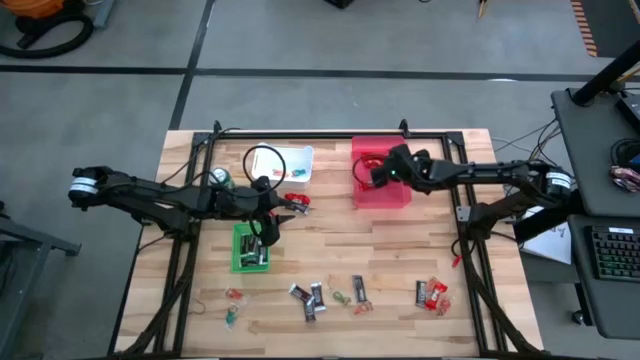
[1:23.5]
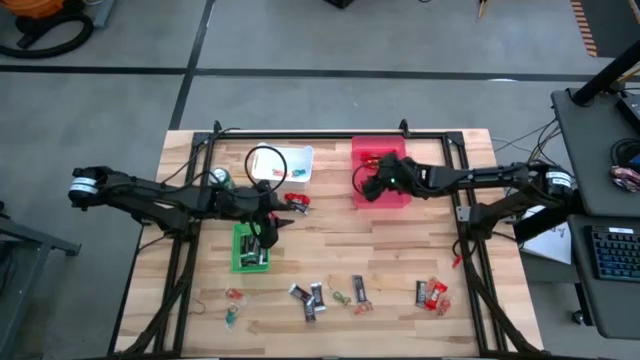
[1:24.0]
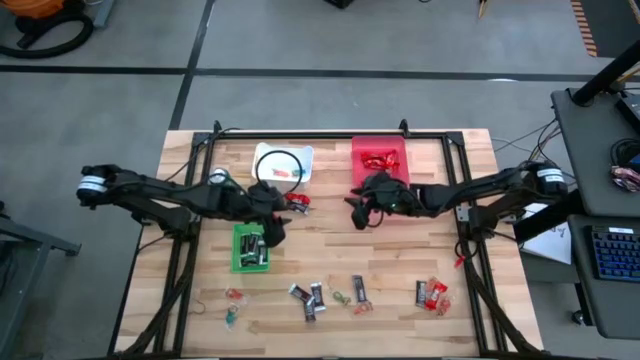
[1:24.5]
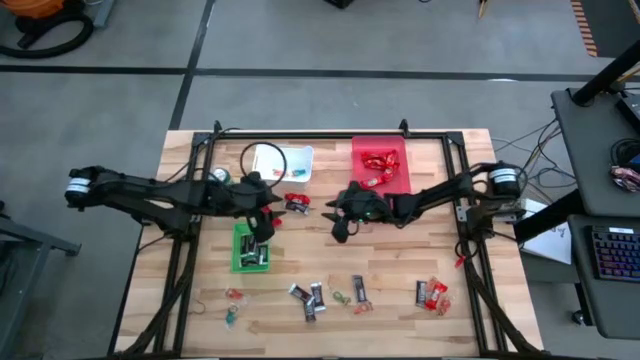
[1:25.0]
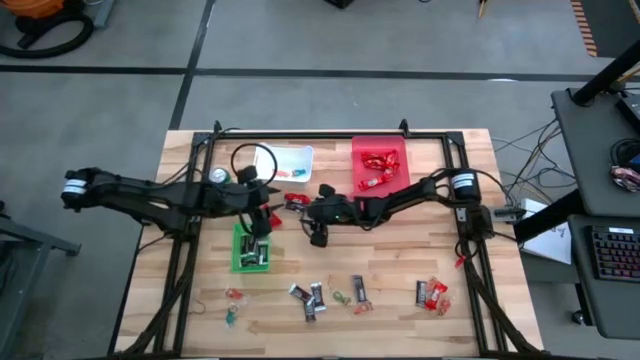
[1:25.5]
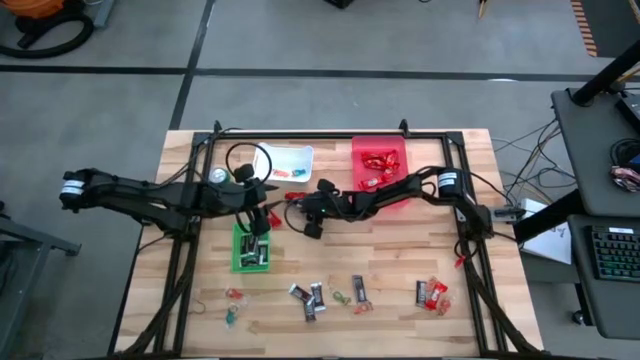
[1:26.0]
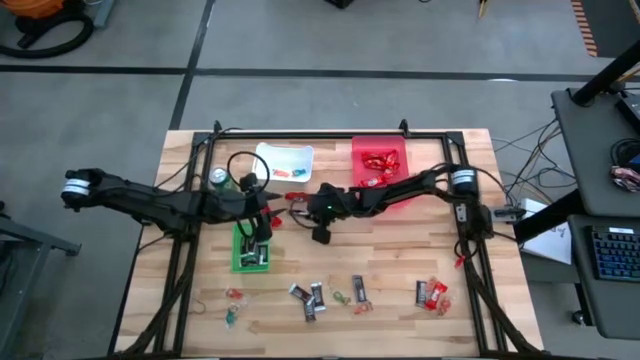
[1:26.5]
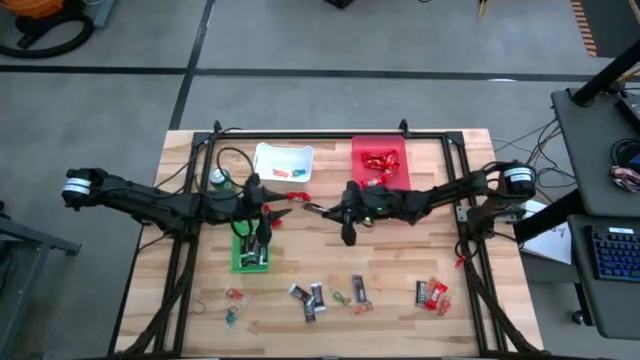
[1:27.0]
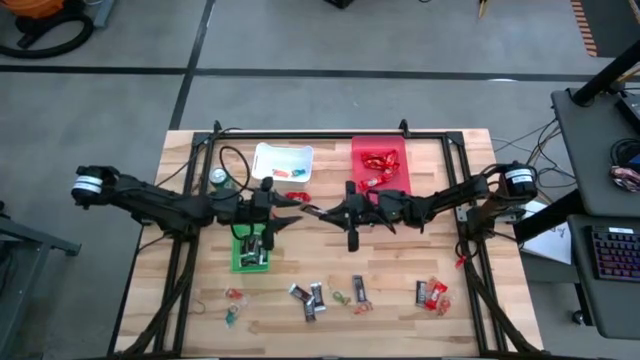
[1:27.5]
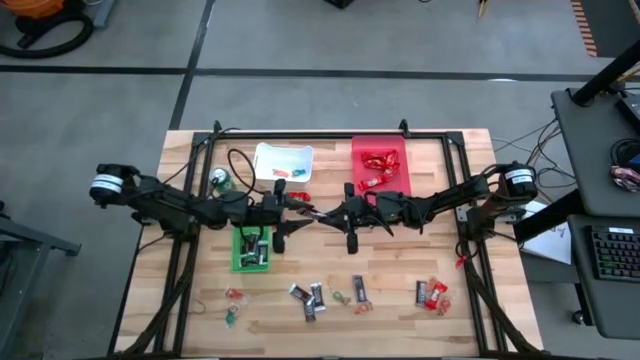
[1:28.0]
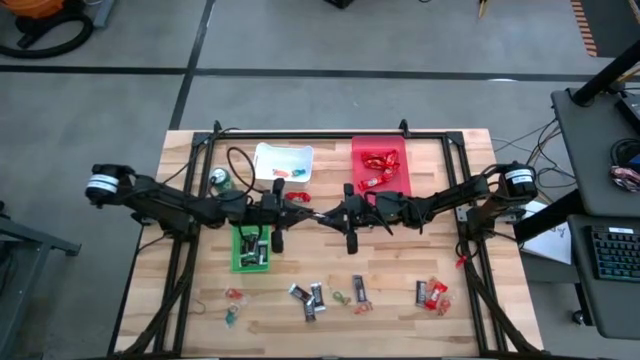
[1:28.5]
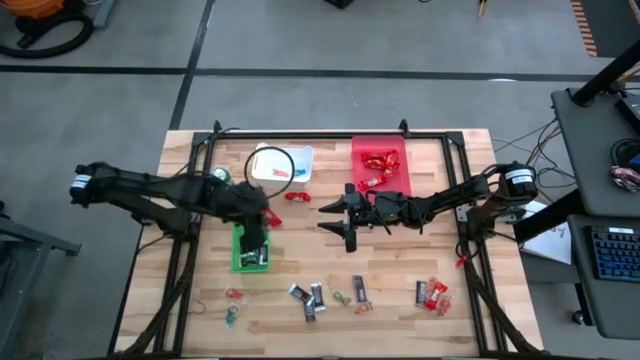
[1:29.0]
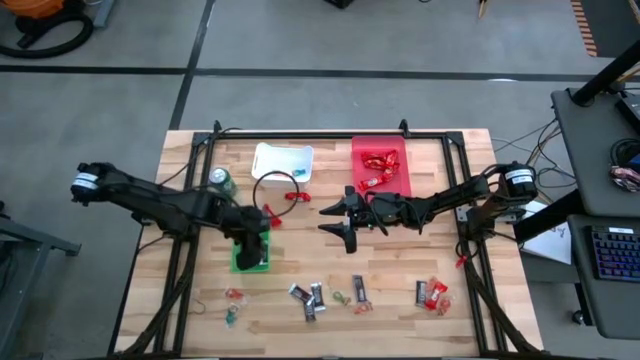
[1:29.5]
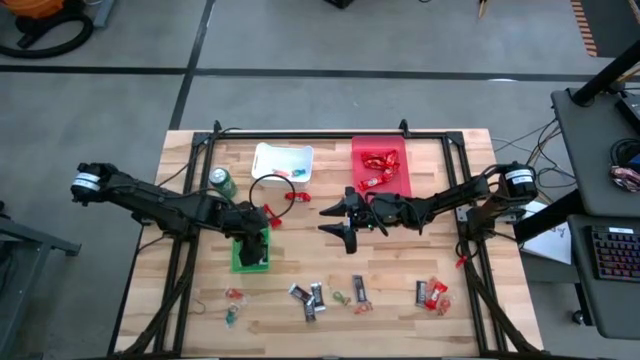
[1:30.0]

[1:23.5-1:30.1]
Task: Organize candy in baskets
Put the brown chocolate into the green basket

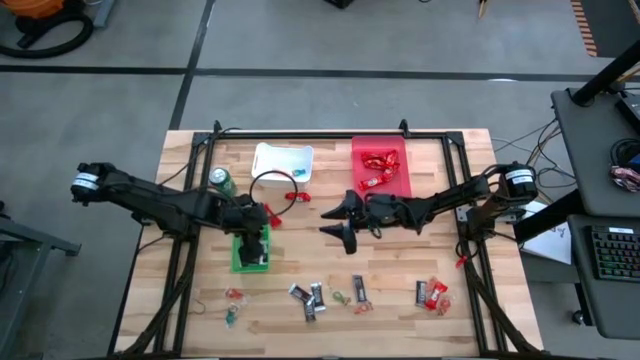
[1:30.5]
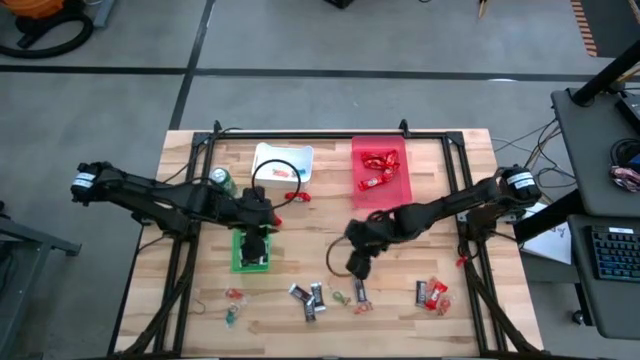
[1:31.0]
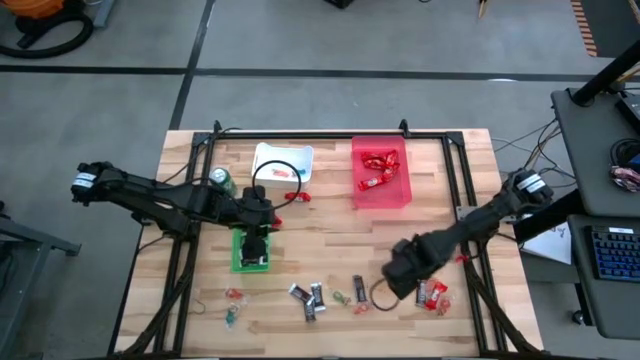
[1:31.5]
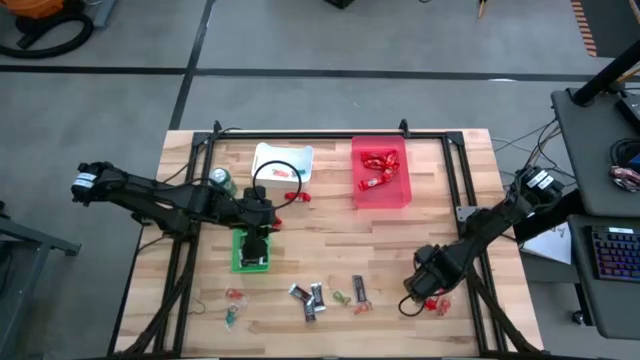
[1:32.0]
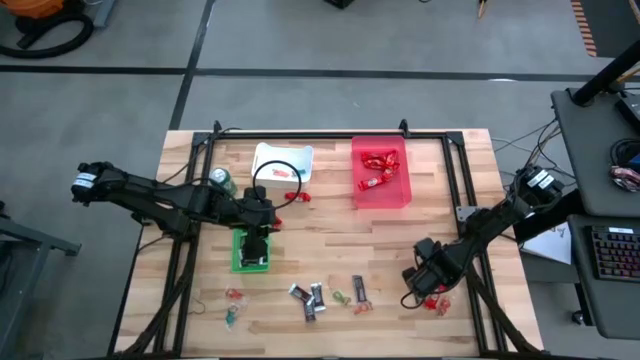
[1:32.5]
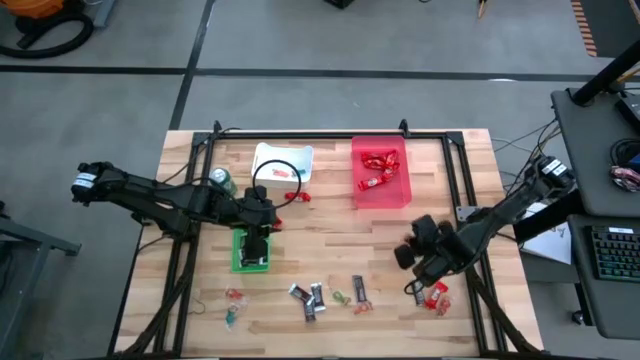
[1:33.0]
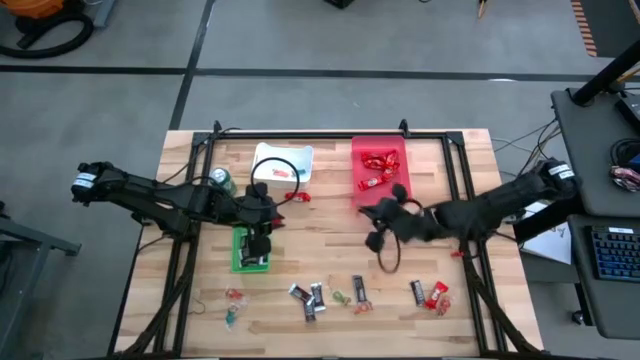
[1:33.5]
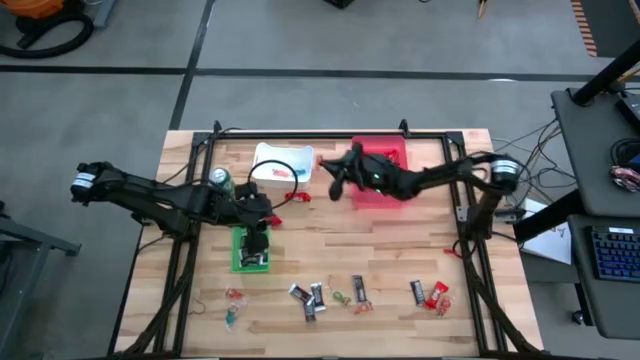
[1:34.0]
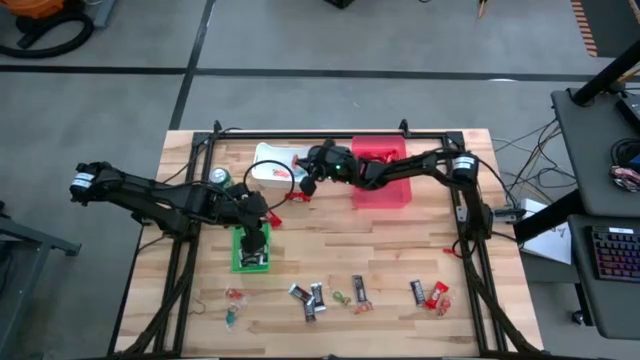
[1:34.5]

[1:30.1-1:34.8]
Put the orange gummy into the white bin

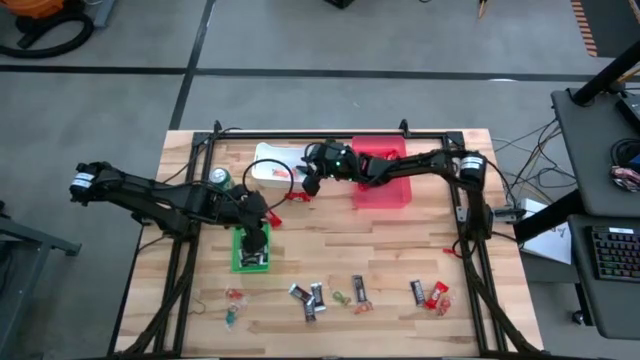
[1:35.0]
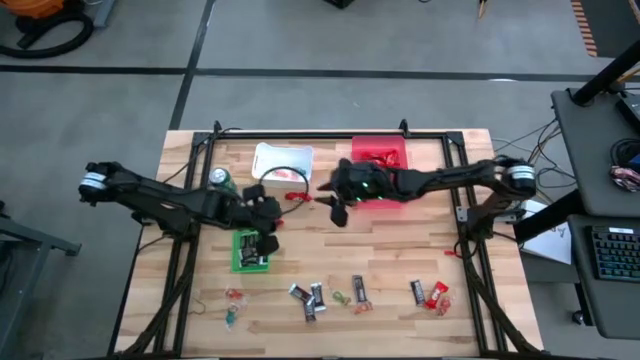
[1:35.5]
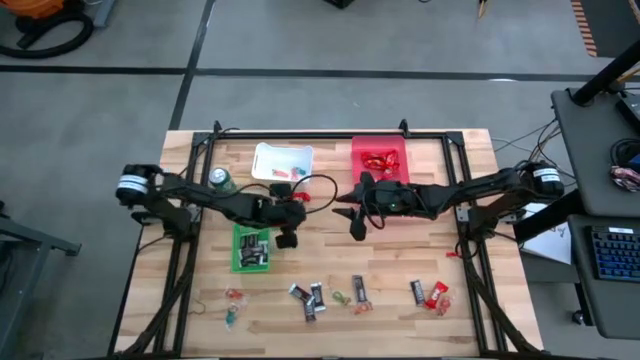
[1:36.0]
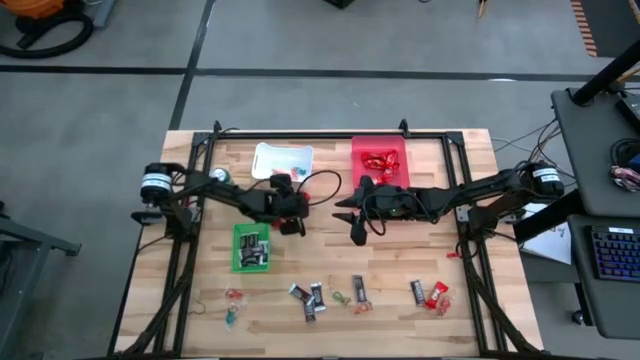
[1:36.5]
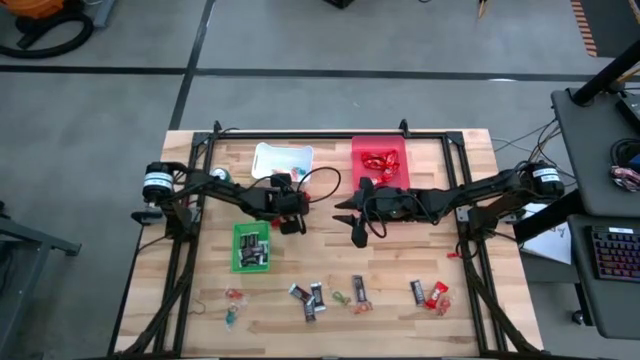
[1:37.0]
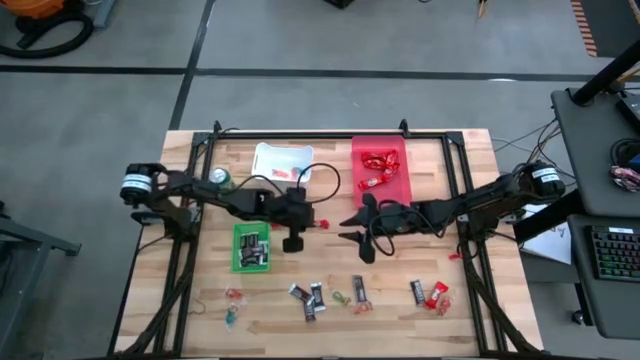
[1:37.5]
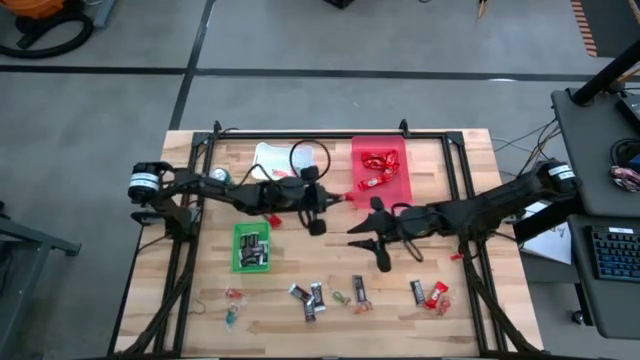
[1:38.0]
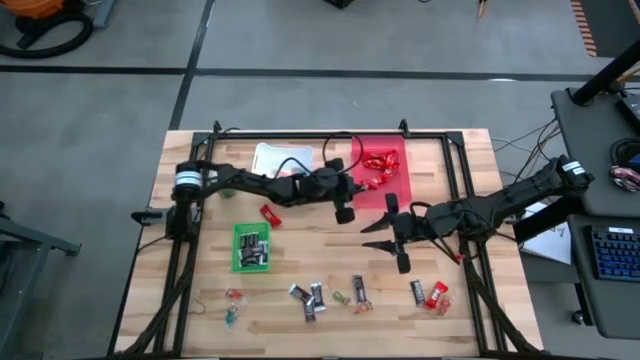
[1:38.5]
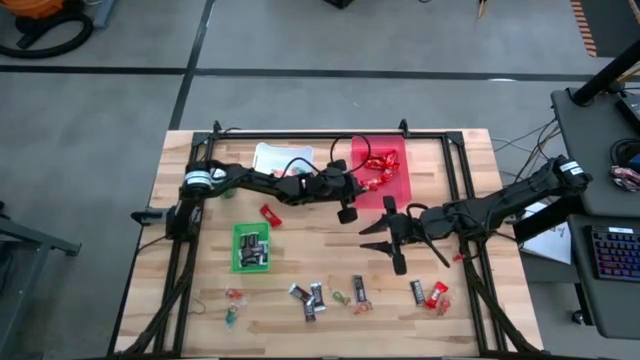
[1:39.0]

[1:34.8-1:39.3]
Put the red chocolate into the pink bin

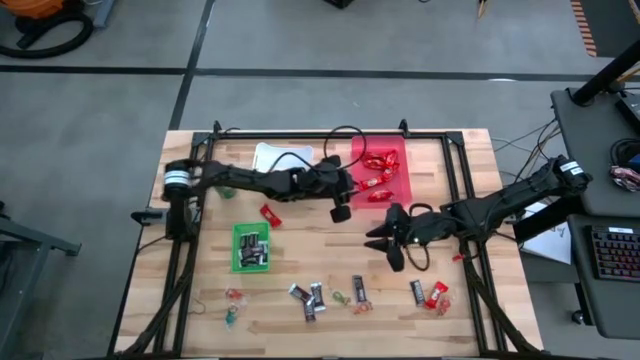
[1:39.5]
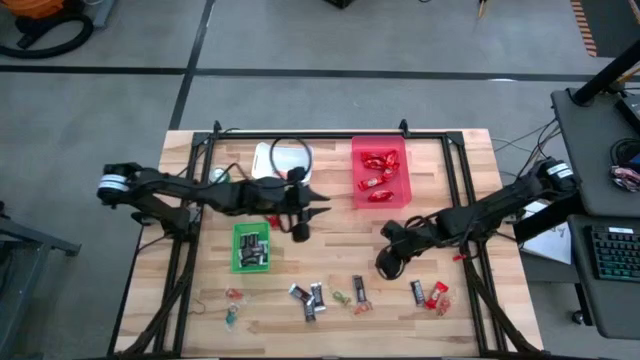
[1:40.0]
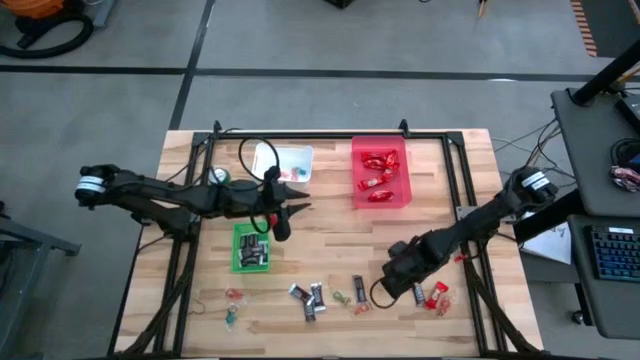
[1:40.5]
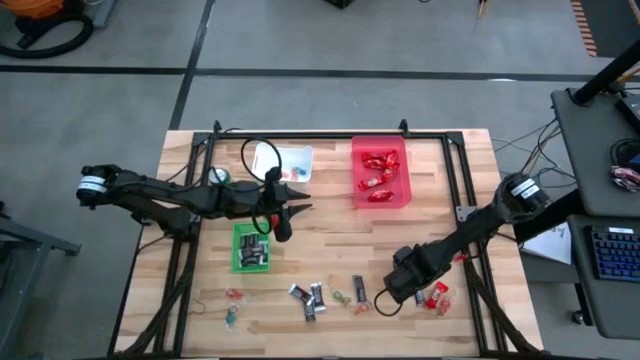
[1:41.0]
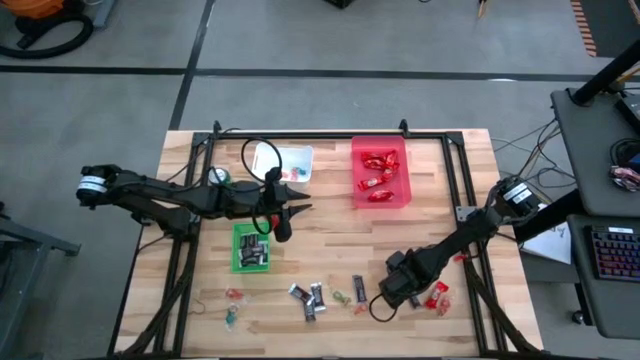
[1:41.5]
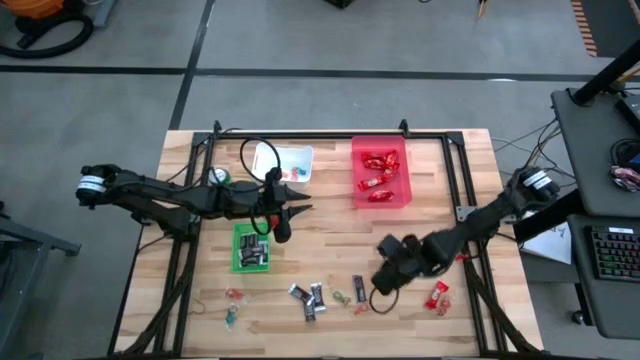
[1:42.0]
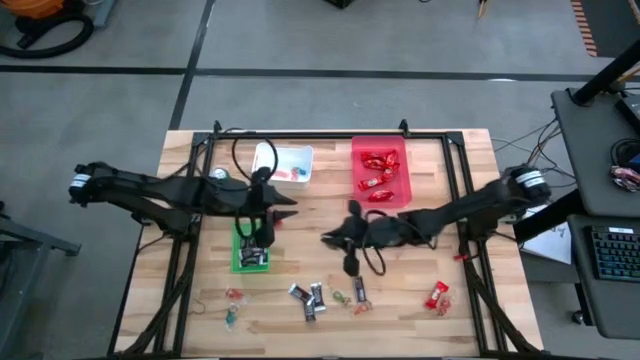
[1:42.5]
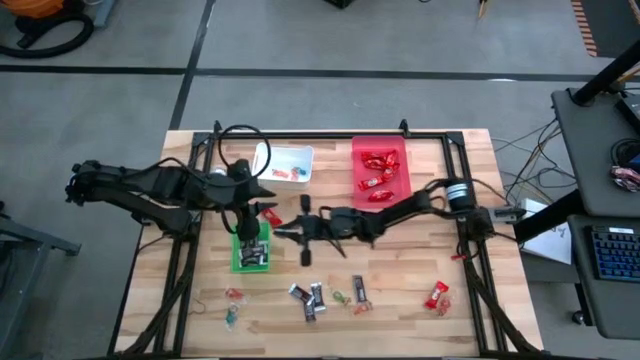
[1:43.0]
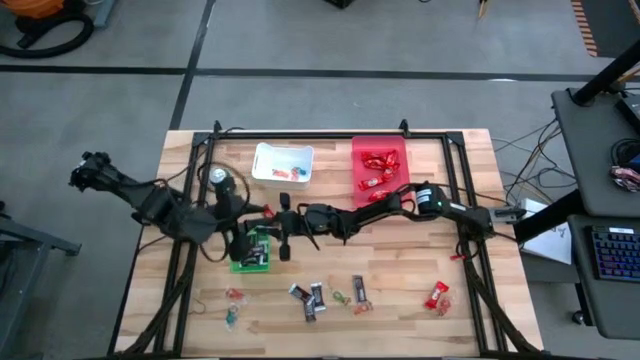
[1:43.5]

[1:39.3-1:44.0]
Put the brown chocolate into the green basket
